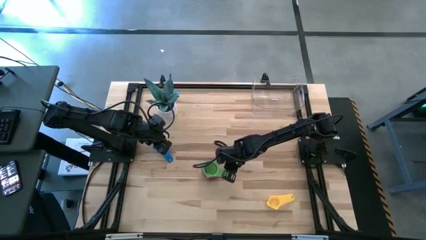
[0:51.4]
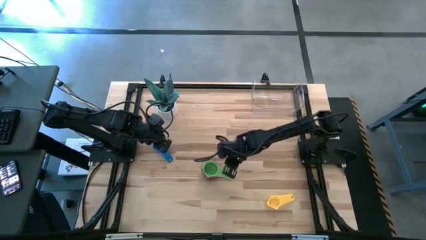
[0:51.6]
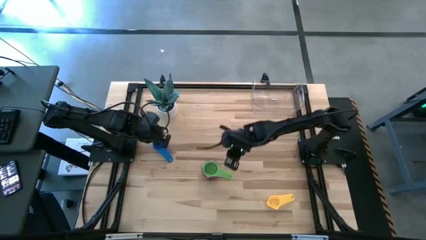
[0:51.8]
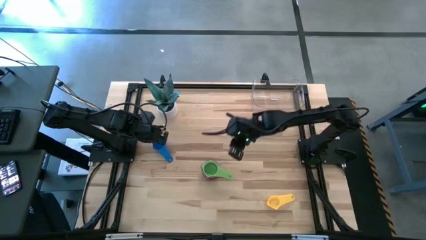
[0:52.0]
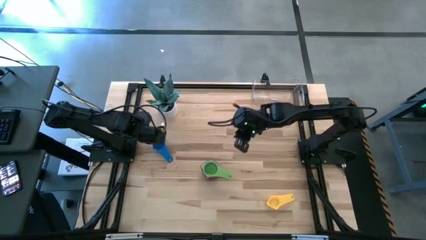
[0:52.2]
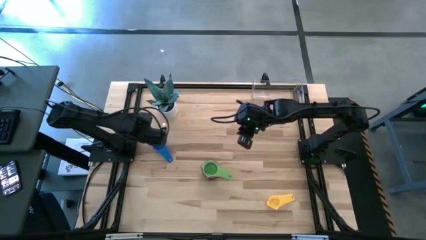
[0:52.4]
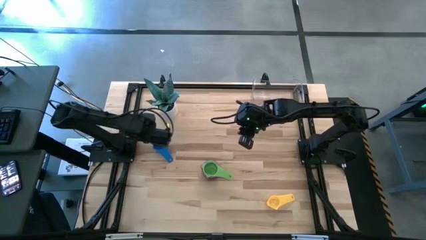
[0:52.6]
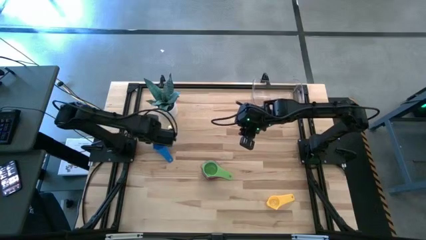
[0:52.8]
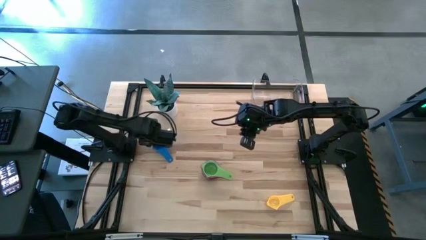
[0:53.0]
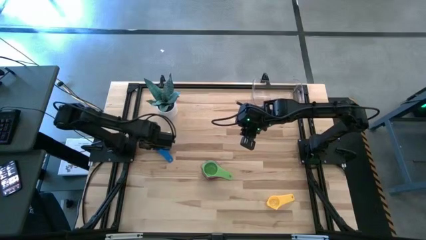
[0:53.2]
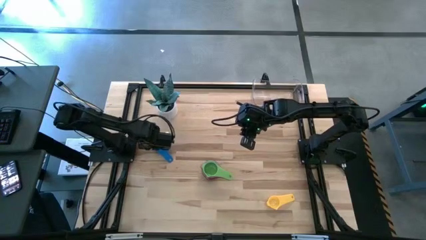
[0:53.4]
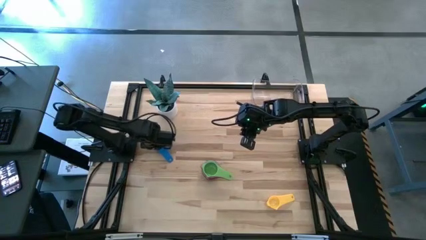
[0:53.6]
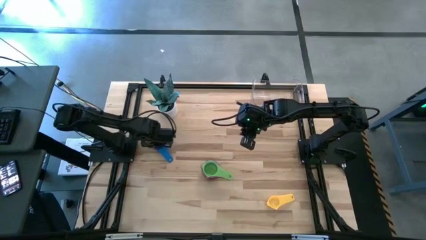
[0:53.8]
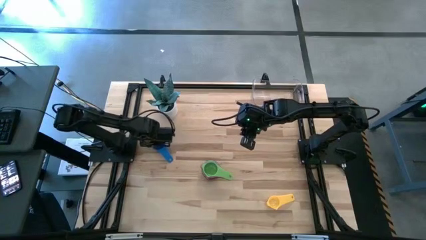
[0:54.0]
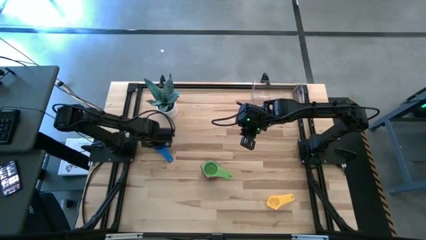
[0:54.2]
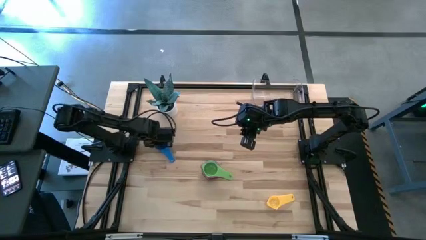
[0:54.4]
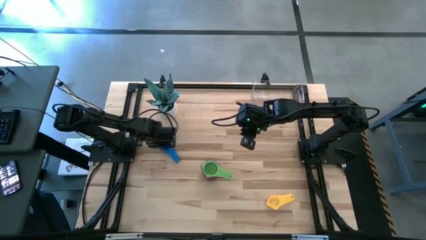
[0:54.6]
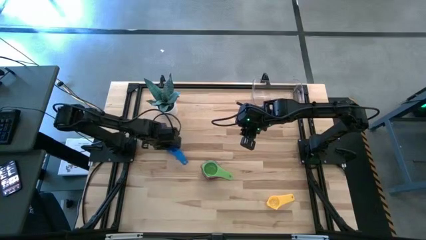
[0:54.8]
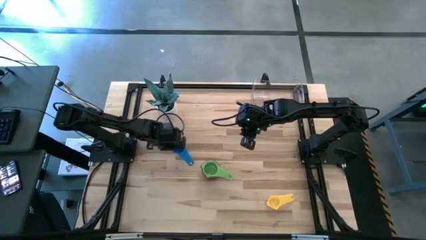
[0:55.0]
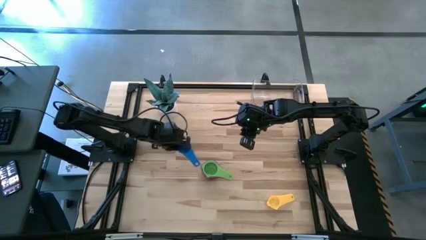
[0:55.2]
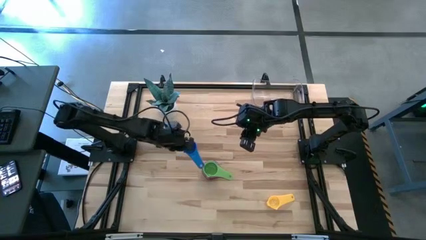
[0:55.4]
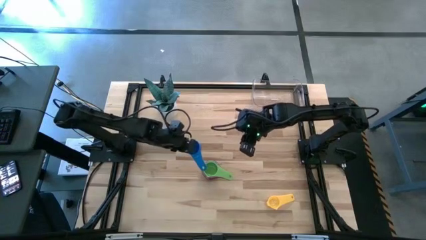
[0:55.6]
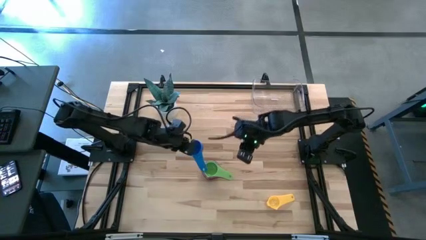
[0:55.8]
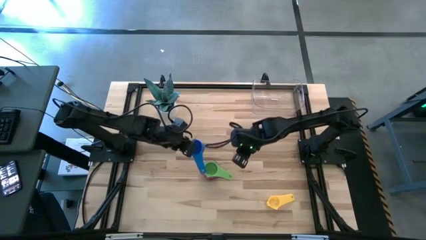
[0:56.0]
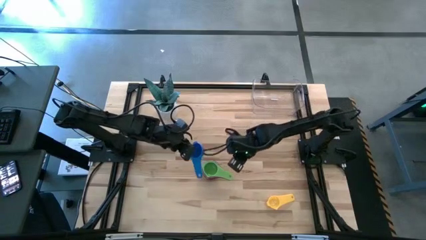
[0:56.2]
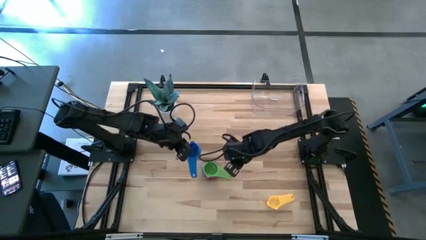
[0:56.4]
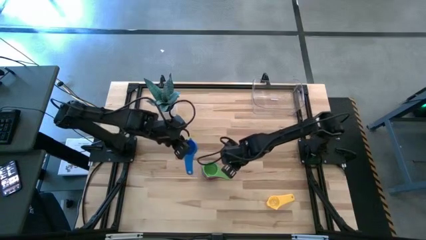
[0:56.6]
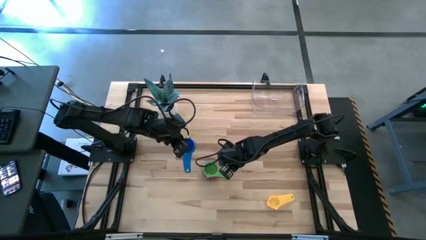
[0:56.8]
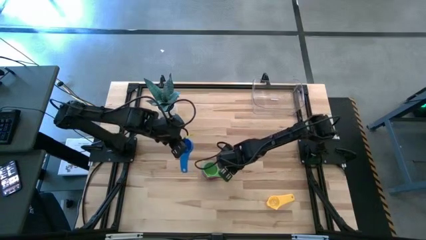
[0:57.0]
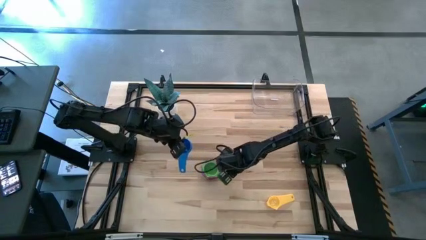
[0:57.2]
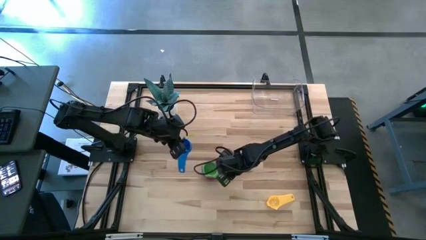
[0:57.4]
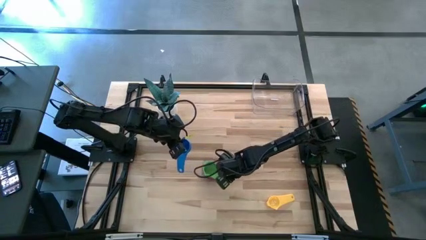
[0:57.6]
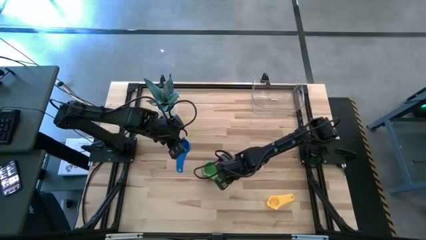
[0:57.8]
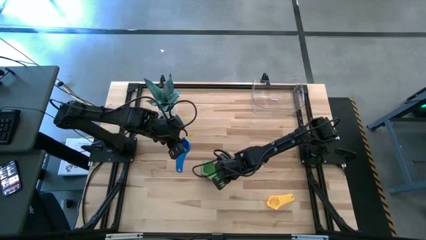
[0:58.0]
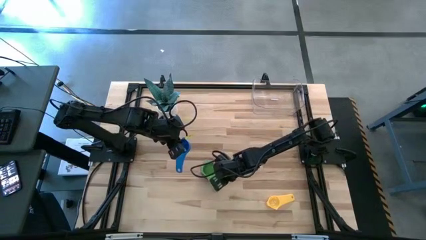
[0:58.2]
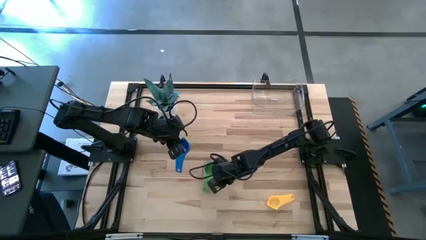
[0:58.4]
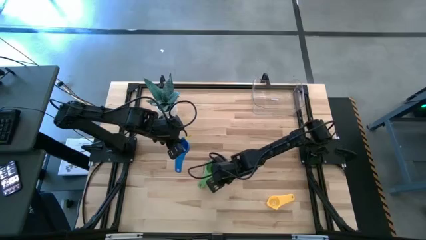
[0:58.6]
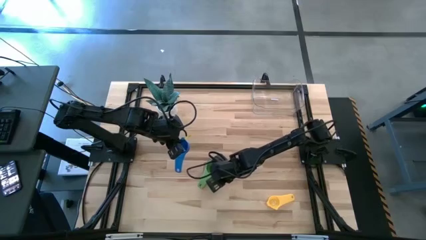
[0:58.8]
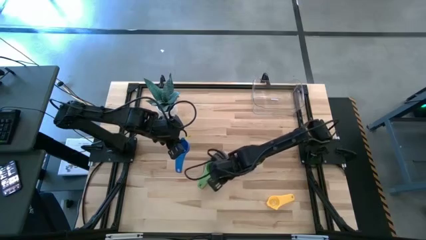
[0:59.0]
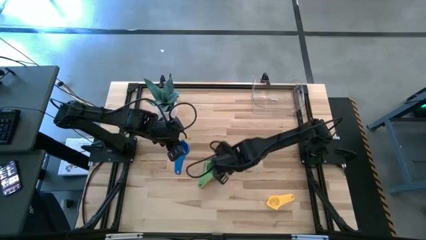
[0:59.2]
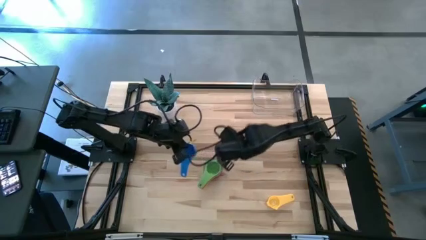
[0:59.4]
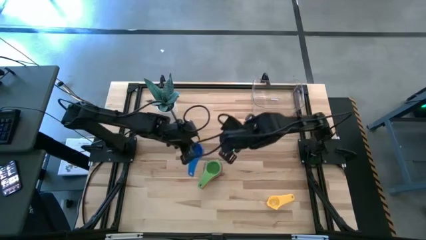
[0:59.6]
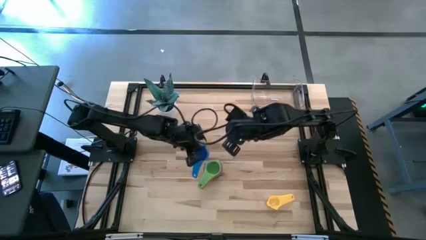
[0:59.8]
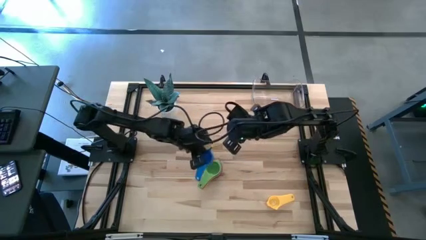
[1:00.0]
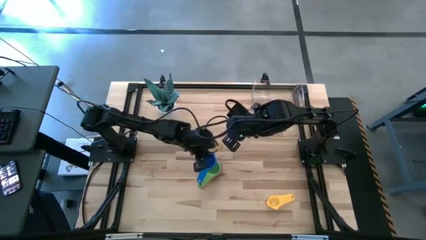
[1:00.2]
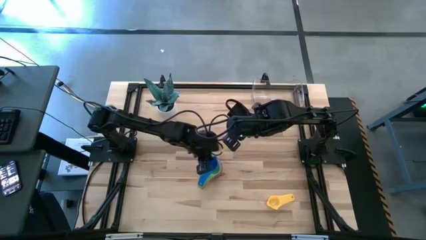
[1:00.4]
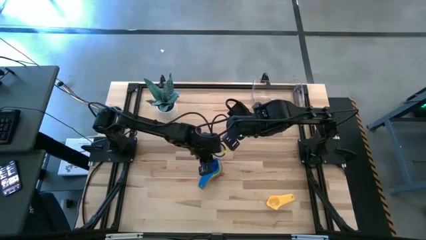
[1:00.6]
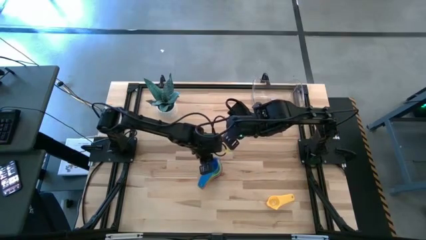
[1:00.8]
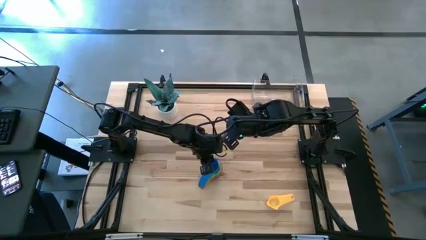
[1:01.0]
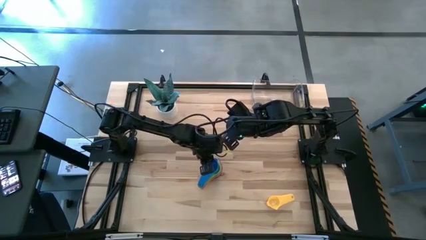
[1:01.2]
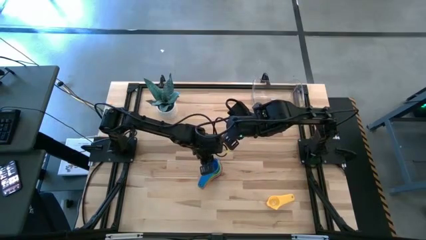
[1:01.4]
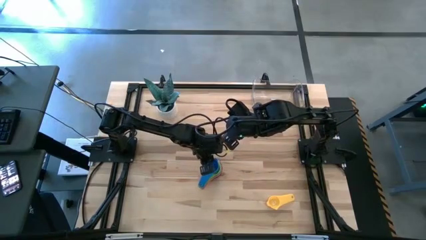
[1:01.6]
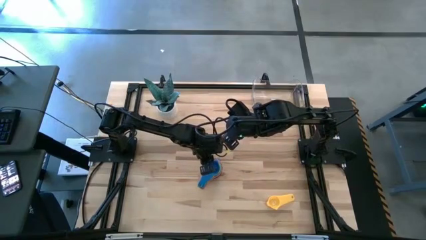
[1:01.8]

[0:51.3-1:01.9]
Task: Nest measuring cups in basket
Stack the blue measuring cup on top of the green measuring cup
